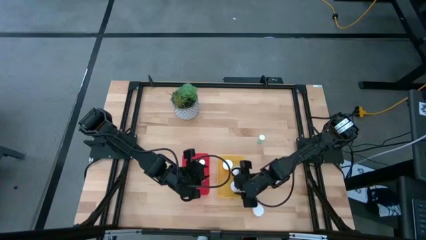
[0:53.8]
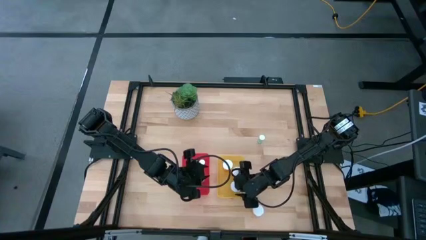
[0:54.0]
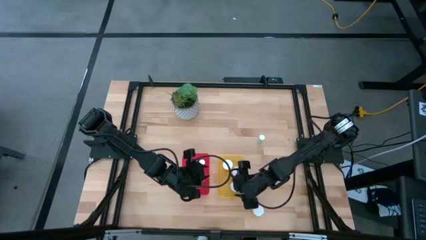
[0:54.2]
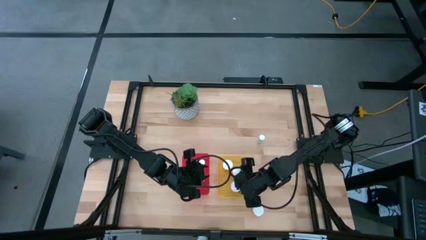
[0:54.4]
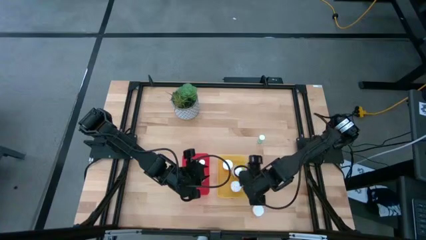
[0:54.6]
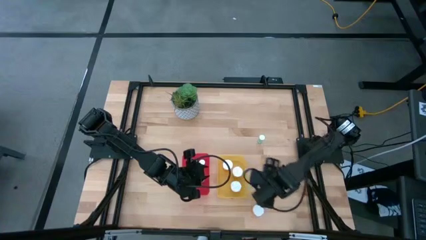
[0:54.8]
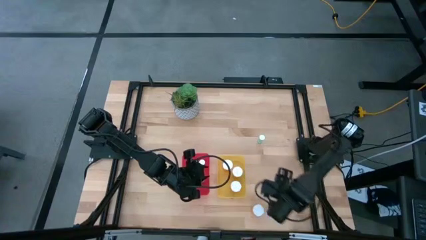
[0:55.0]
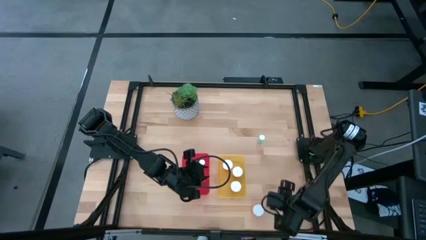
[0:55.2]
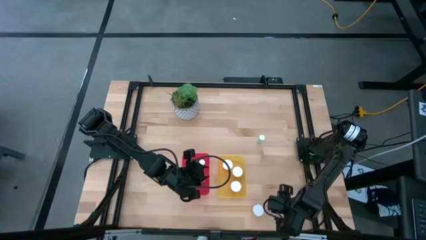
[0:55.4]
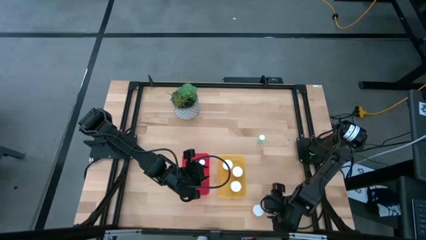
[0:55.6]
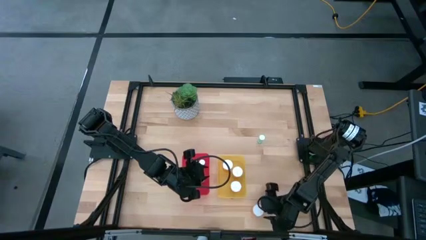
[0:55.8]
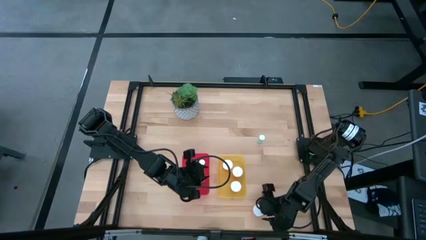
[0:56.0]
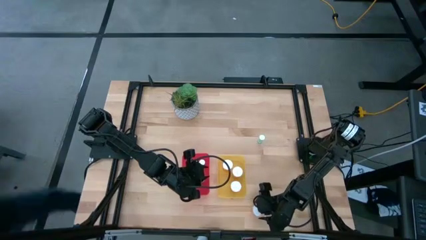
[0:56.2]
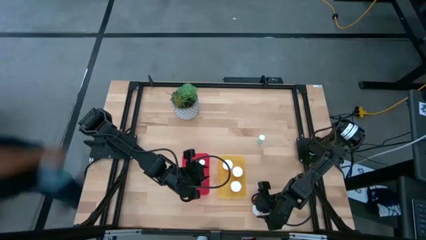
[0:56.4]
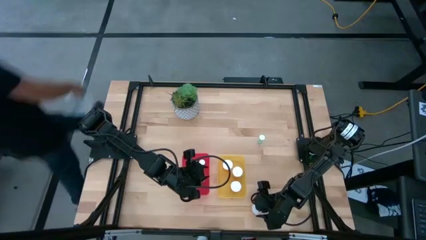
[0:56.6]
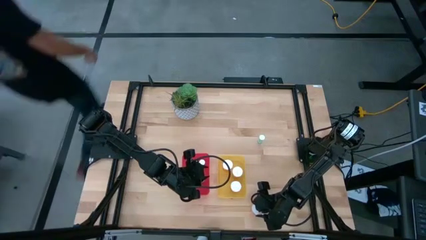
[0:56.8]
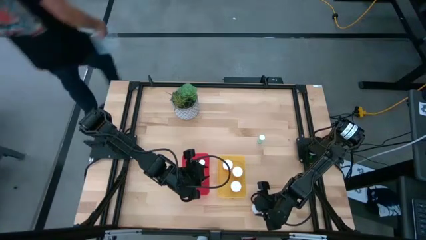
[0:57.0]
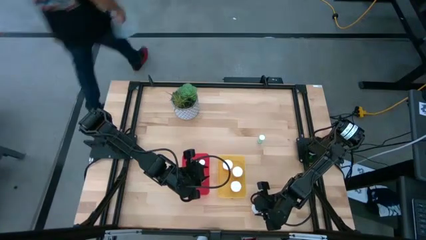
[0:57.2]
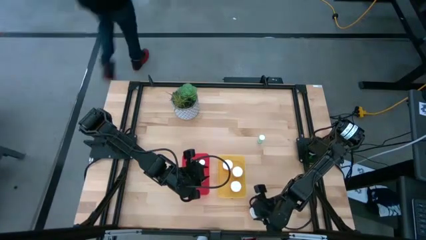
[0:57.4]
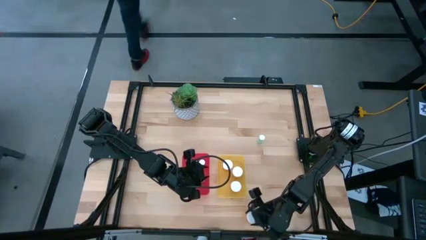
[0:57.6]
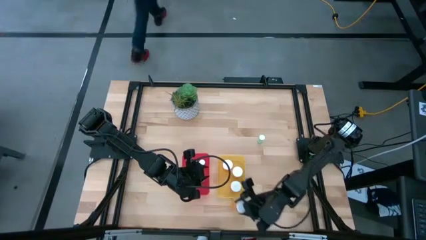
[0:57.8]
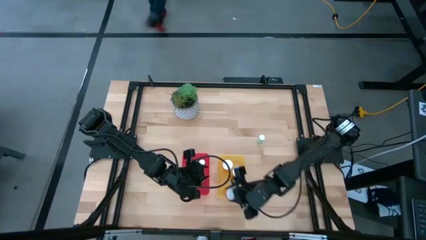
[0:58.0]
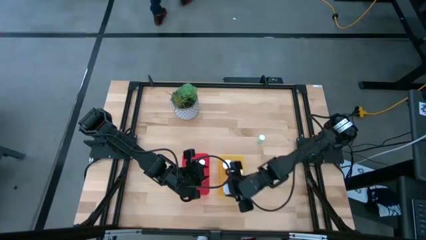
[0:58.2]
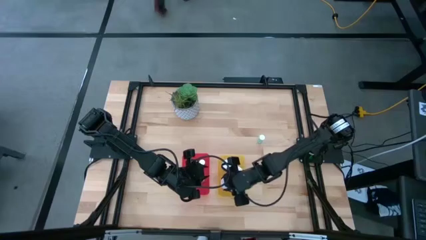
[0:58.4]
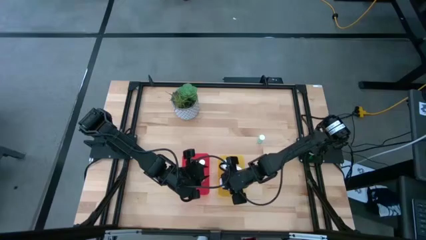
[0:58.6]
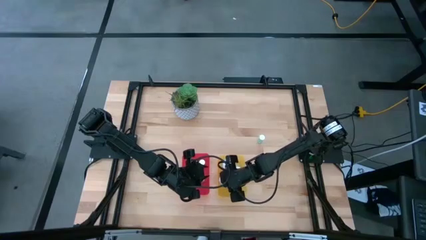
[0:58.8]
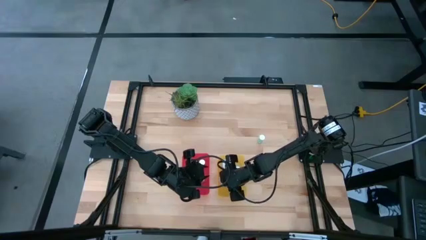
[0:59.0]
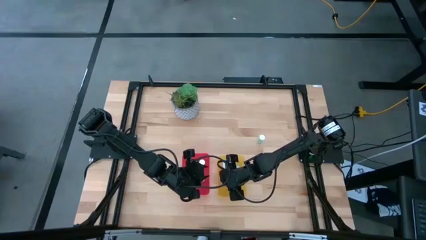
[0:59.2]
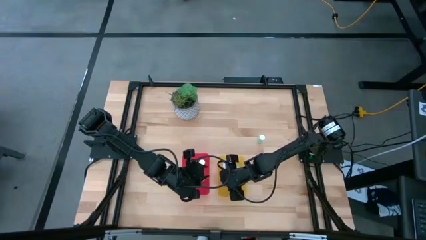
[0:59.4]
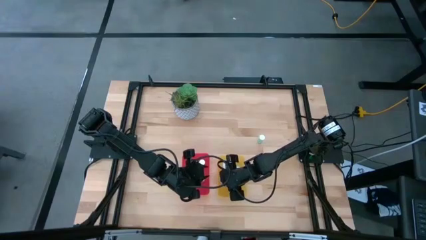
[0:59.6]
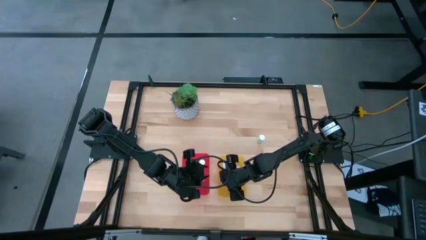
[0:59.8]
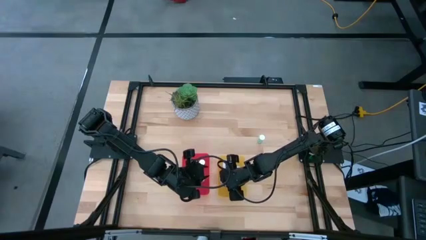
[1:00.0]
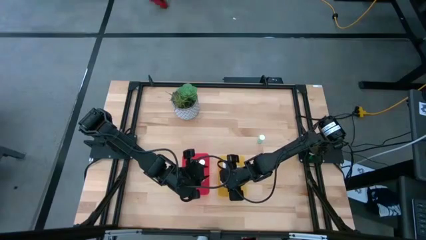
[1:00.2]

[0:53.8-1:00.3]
Task: Pick and place medicine bottles into bin by pill shape (circle, oval)
Put the orange capsule bottle into the yellow bin

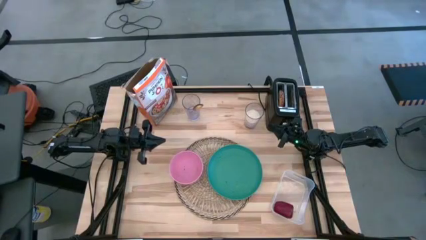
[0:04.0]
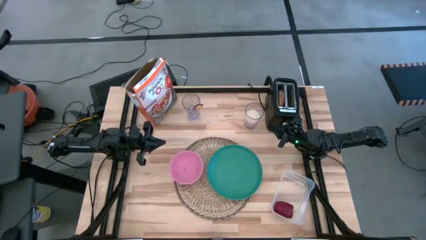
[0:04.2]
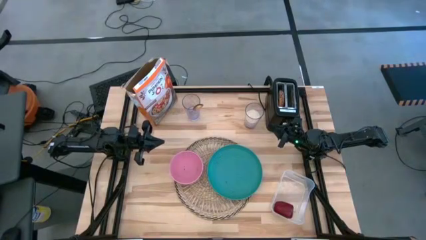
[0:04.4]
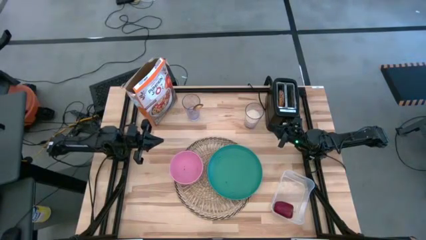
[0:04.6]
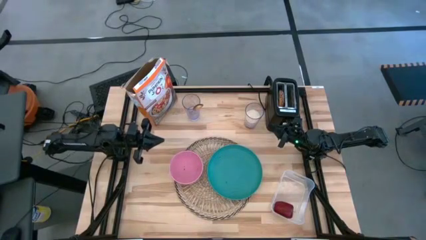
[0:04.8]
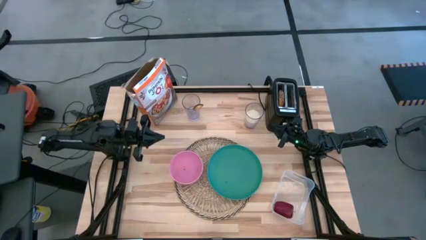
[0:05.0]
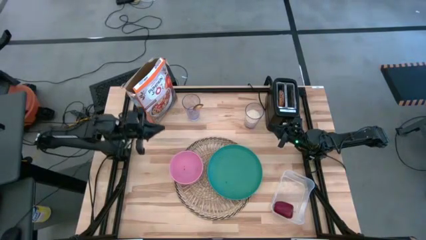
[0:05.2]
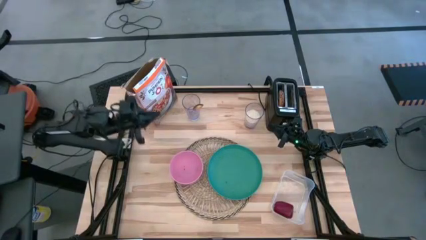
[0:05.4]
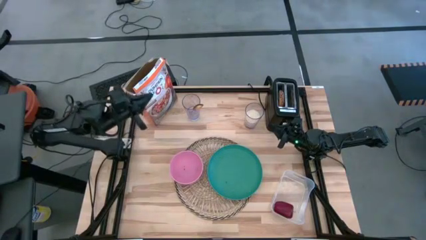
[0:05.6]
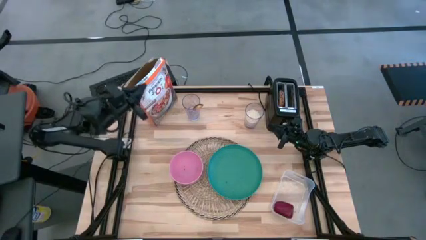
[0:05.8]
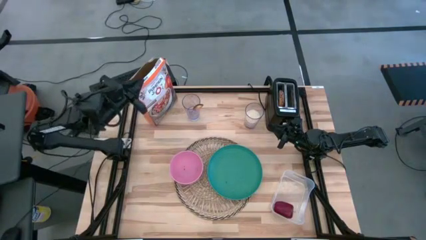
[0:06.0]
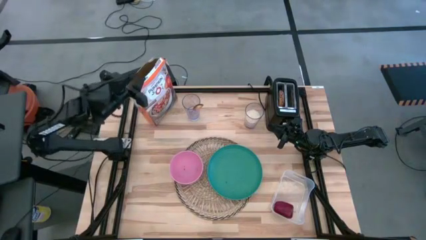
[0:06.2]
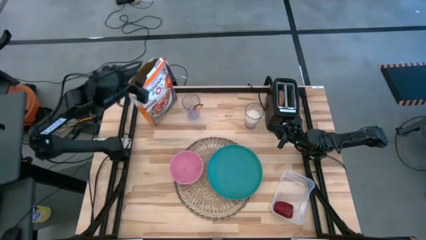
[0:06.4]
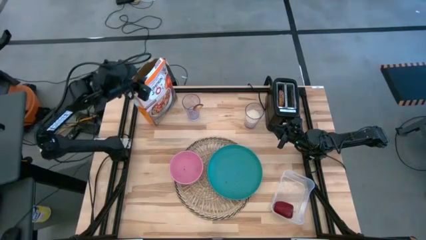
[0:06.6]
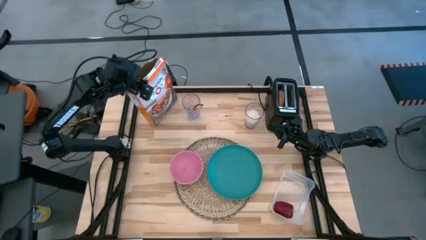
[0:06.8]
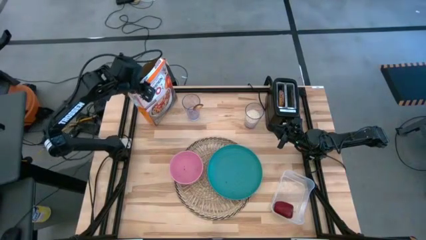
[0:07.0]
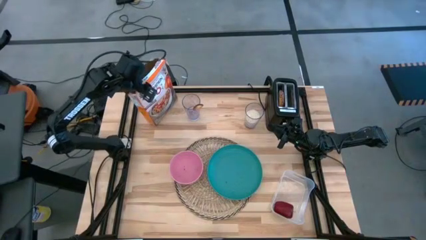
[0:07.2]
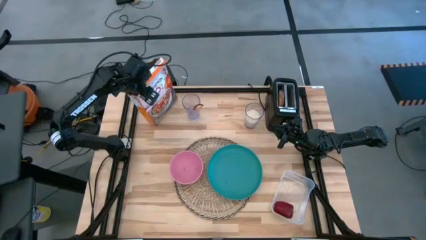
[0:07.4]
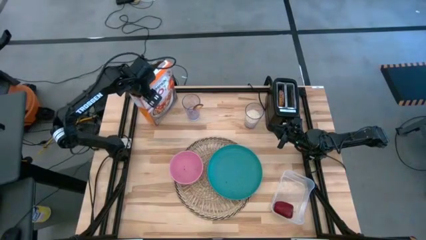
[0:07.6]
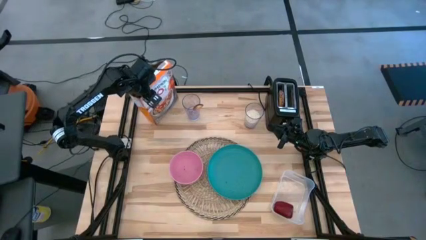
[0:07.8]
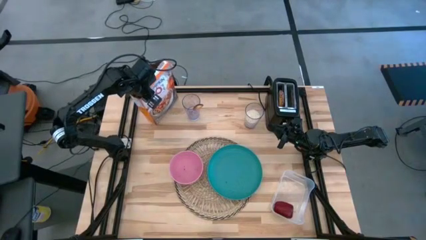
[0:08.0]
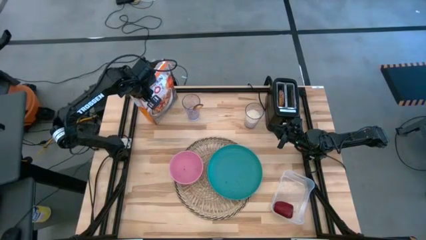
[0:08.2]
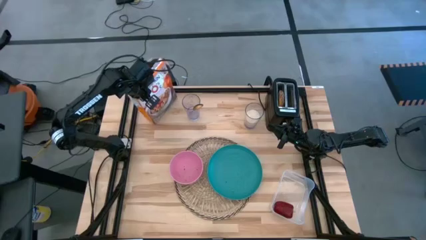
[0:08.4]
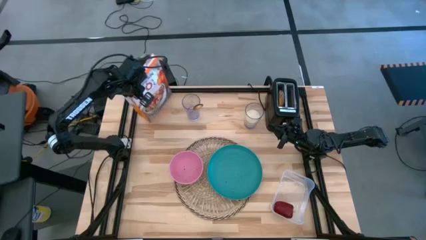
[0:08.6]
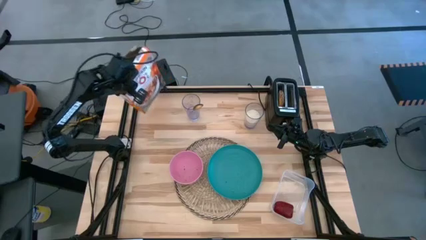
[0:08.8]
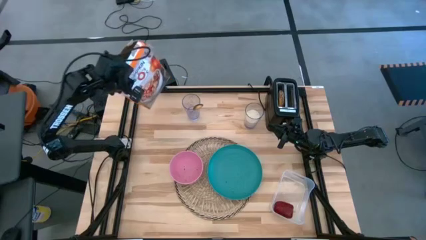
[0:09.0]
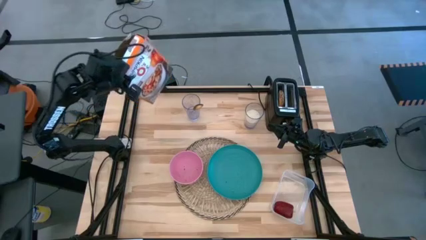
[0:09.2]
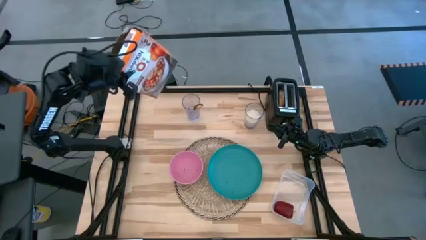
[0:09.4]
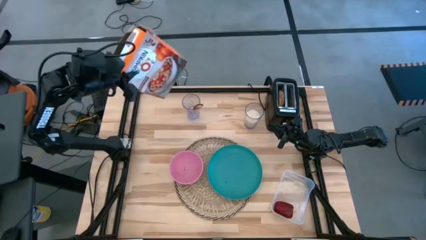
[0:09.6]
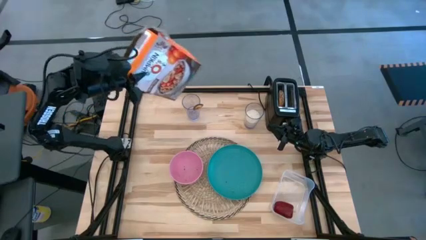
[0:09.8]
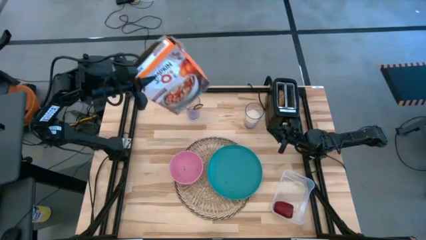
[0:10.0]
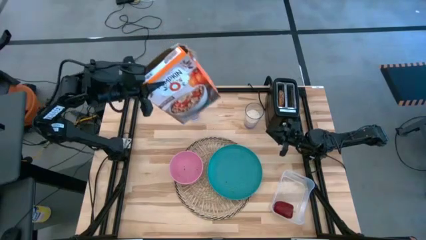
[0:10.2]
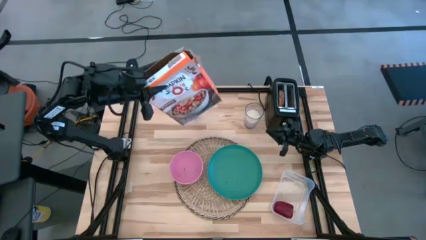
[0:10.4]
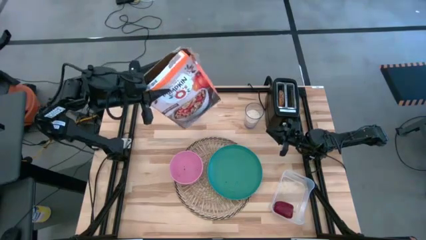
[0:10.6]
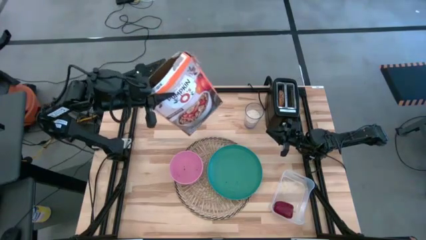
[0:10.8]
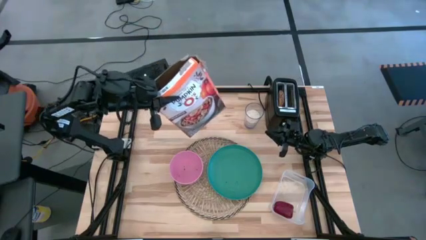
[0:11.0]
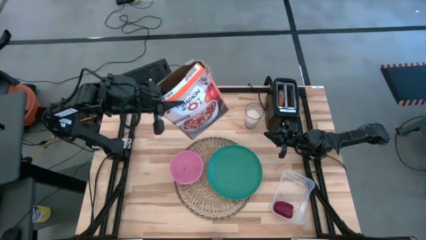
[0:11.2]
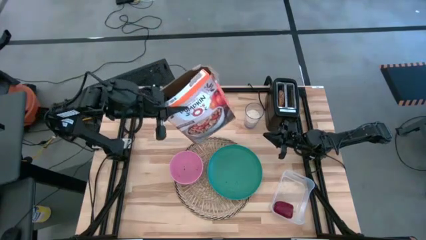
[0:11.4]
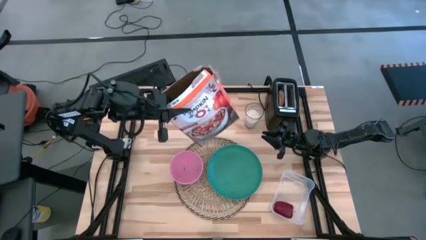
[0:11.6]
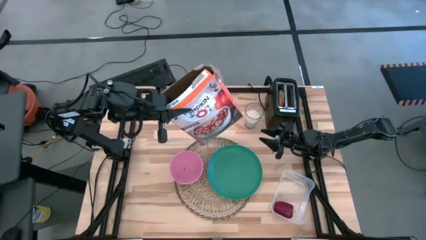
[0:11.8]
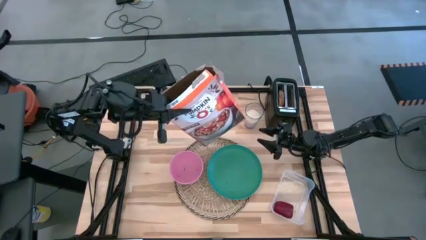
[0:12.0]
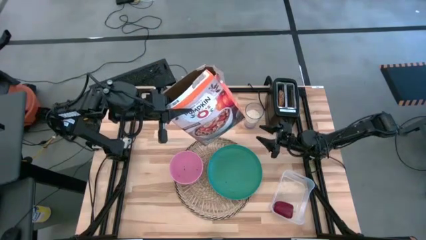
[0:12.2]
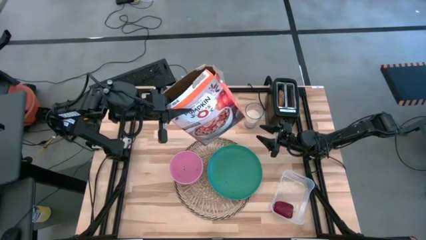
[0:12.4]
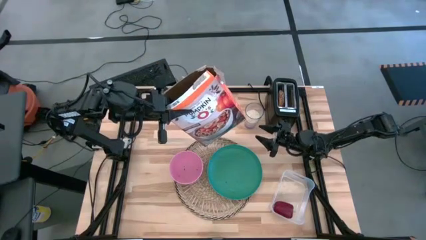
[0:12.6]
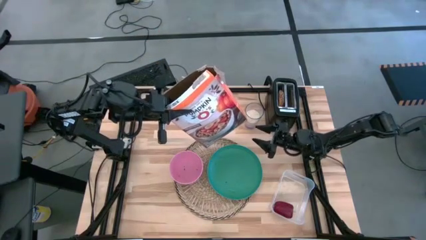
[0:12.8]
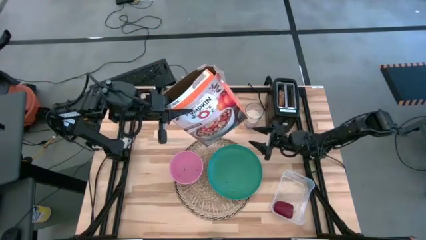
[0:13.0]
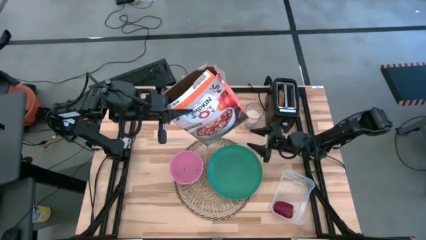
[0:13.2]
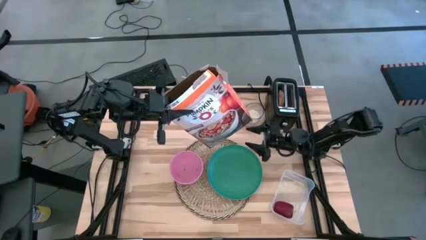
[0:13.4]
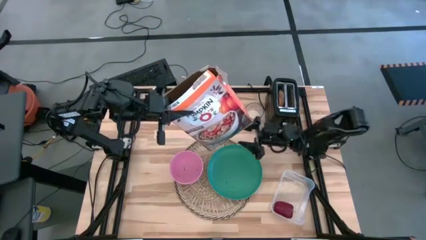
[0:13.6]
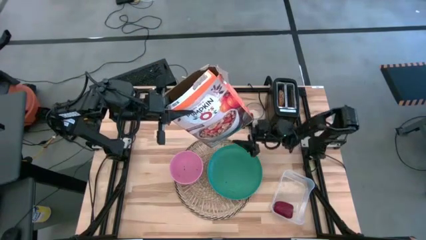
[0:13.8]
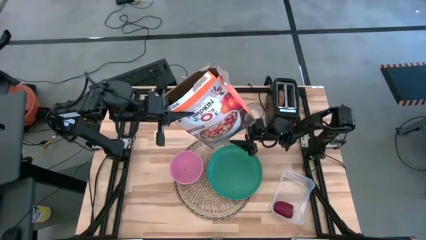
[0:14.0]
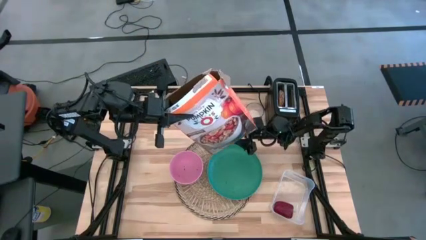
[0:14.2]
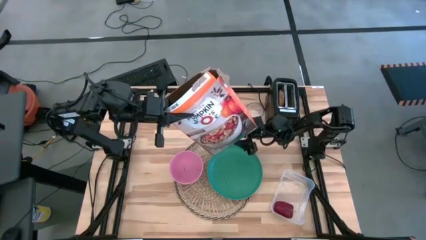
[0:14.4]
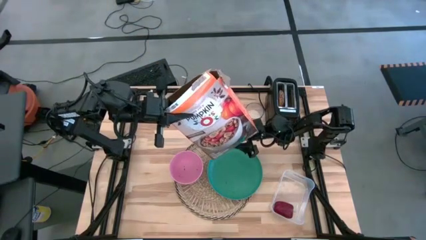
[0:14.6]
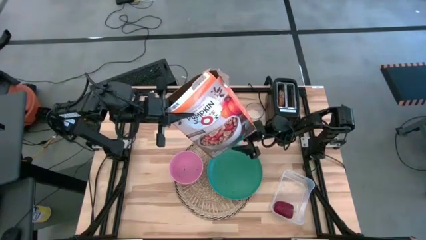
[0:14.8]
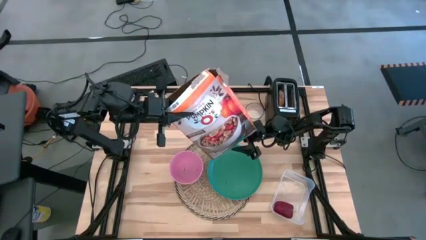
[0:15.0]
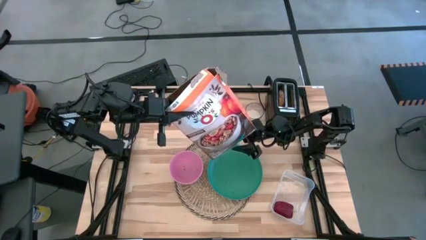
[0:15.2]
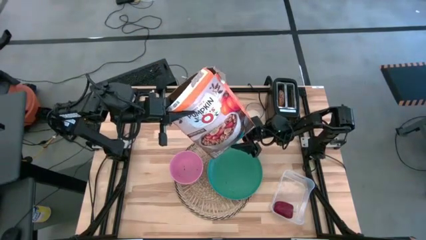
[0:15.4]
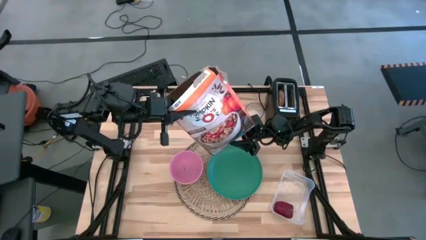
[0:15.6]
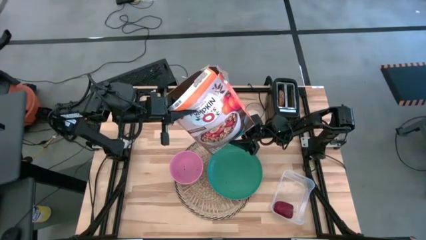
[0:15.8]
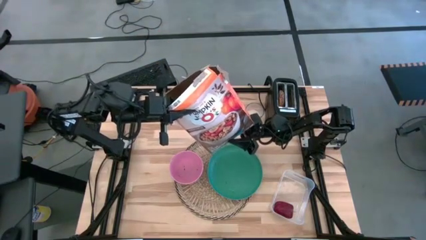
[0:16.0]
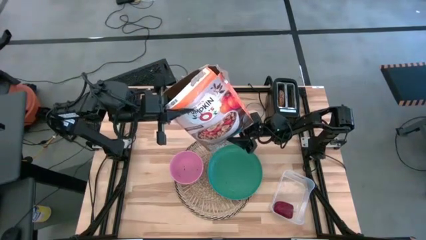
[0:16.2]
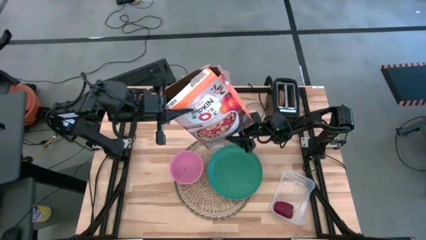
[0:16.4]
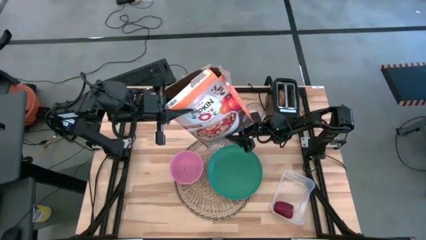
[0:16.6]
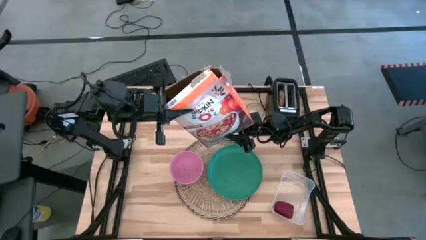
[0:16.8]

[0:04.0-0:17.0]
Task: Arrange a breakfast setting
Pour the cereal into the pink bowl from the cereal box
